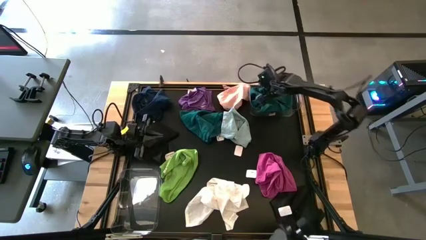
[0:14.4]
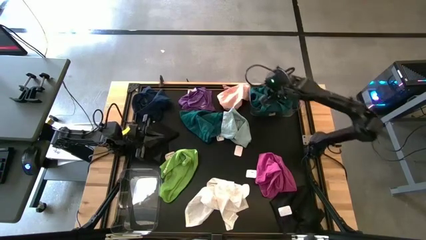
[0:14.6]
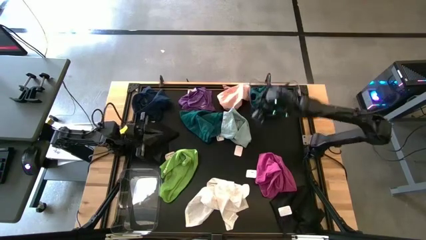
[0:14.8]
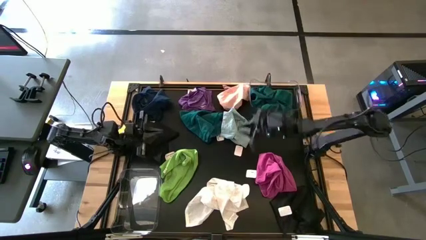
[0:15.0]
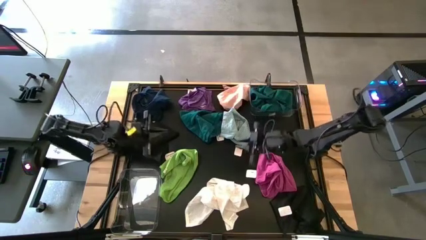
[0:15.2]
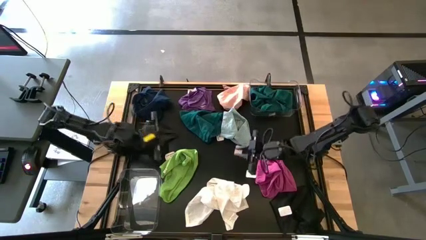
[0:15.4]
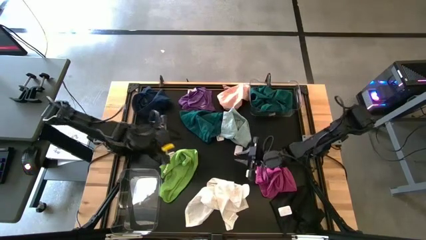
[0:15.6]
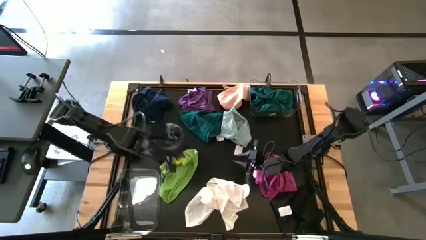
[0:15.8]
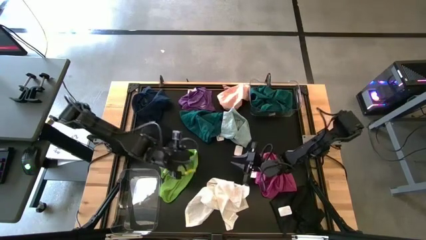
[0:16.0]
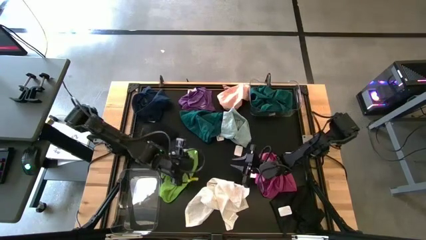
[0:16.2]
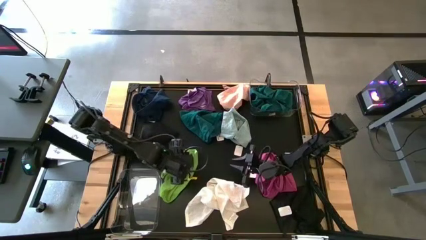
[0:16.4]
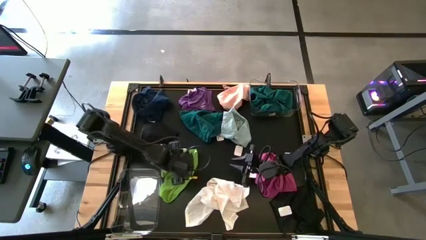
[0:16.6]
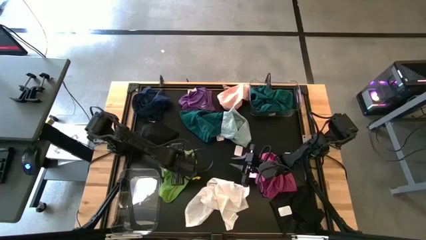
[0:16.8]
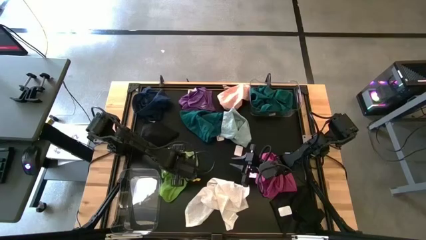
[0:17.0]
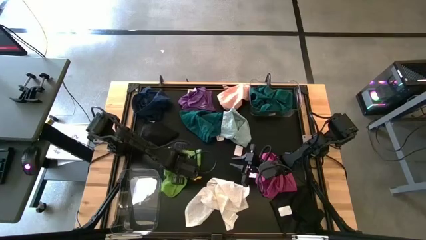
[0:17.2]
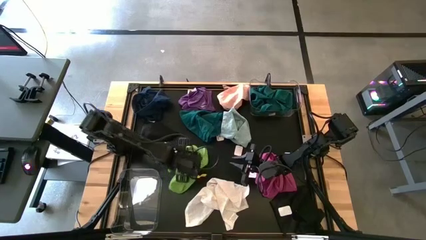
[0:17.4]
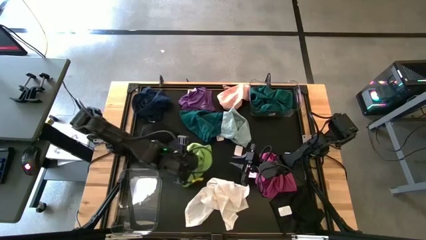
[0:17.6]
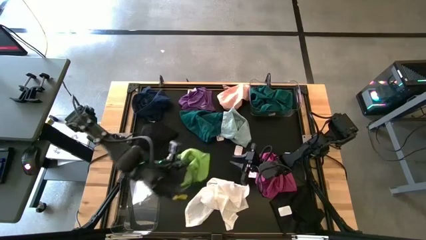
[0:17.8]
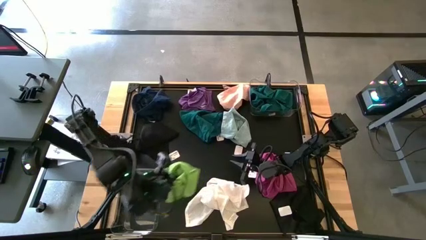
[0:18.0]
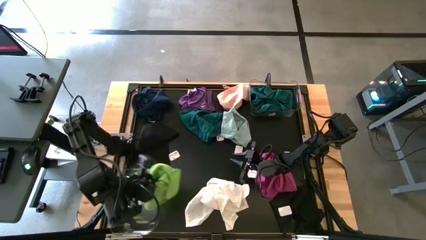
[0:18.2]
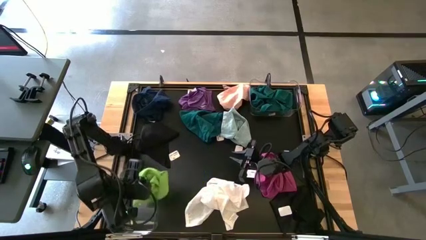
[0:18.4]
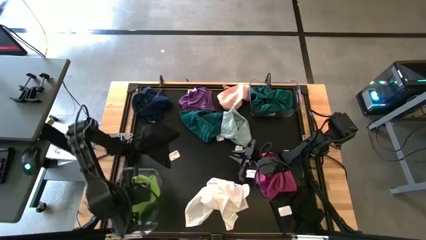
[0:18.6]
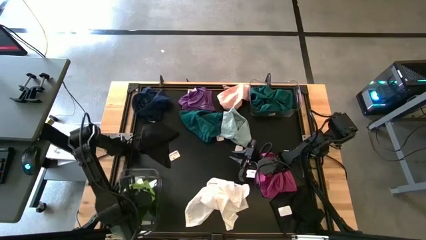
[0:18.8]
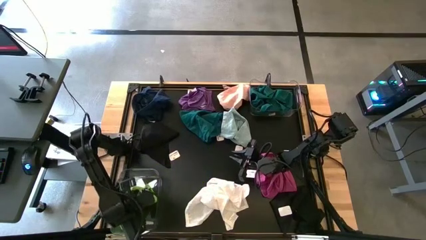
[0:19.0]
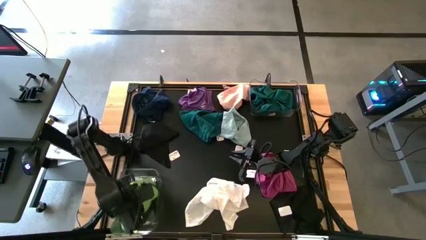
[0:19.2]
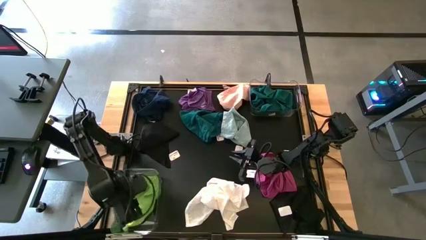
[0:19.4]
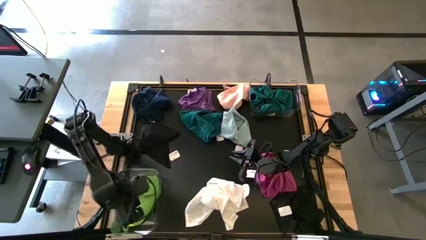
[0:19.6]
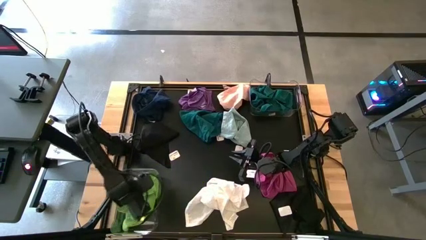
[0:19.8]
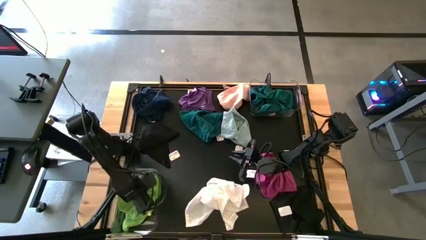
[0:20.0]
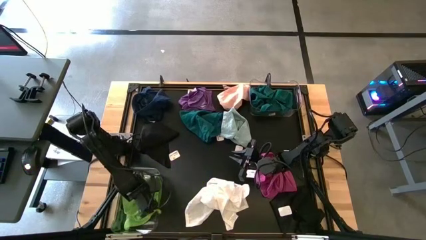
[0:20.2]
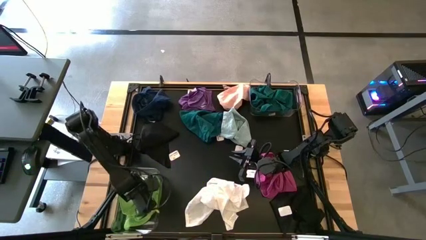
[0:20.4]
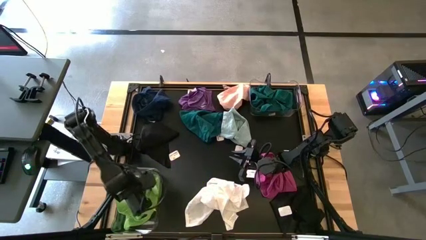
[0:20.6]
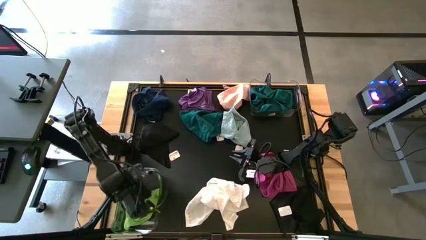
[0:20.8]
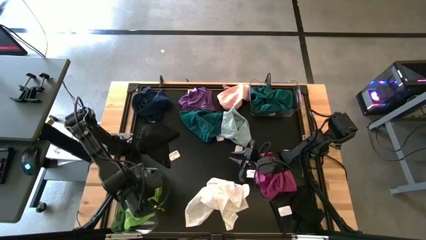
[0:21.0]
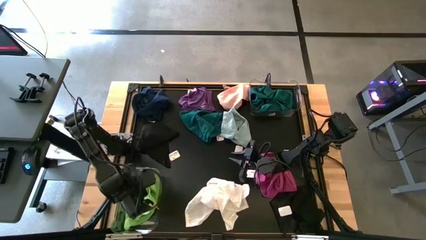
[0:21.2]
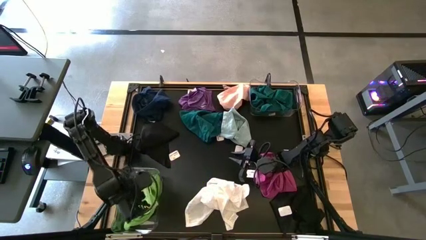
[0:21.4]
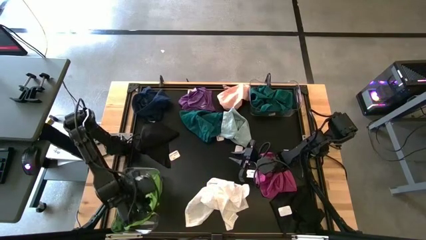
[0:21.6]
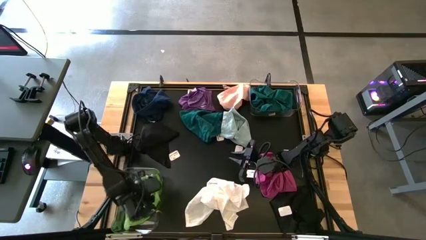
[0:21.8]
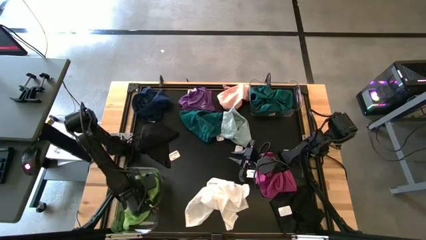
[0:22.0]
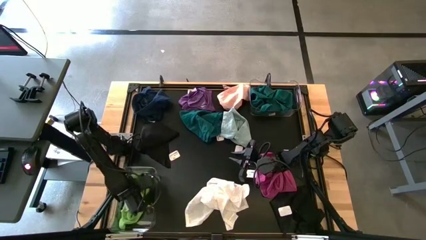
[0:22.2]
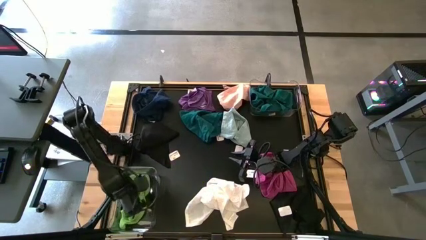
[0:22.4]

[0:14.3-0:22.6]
Task: Sort towels by color in basket
Put the light green towel into the bottom transparent bin

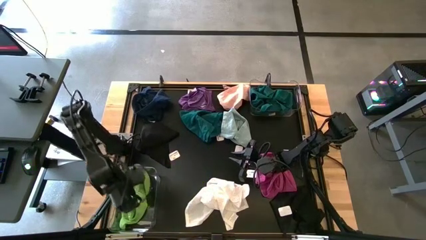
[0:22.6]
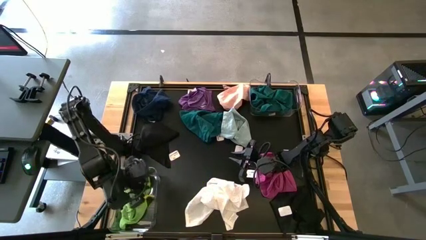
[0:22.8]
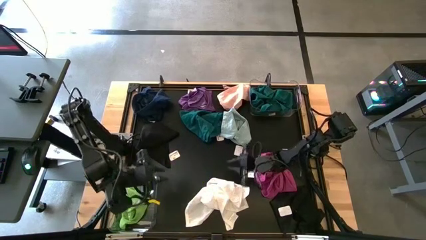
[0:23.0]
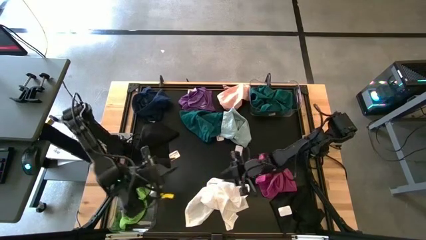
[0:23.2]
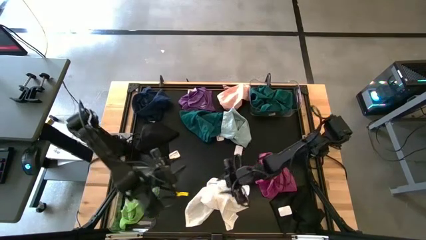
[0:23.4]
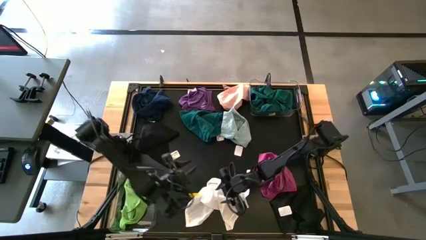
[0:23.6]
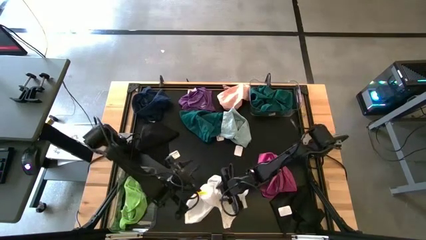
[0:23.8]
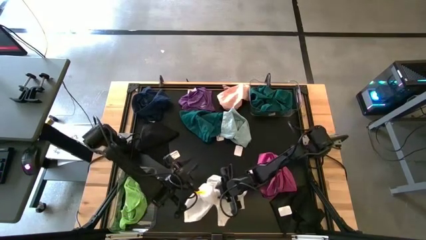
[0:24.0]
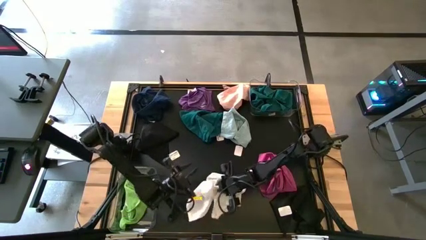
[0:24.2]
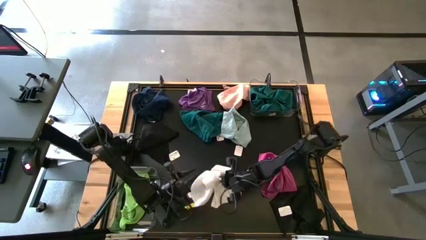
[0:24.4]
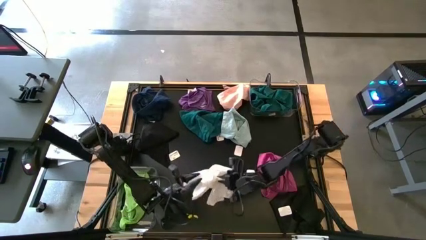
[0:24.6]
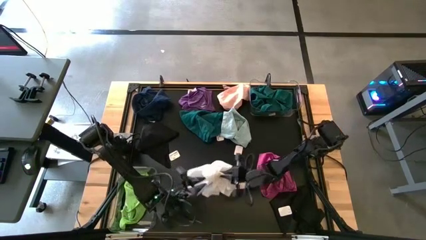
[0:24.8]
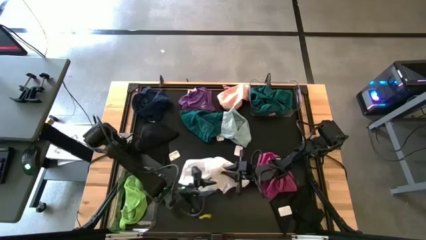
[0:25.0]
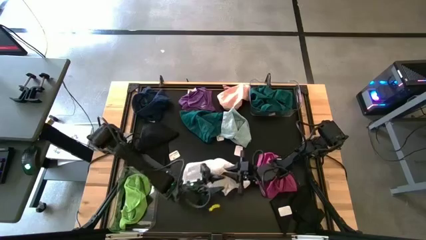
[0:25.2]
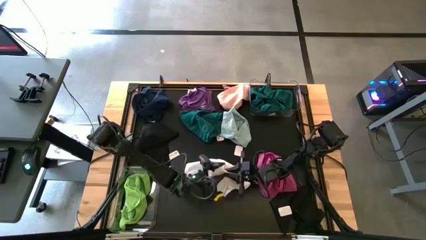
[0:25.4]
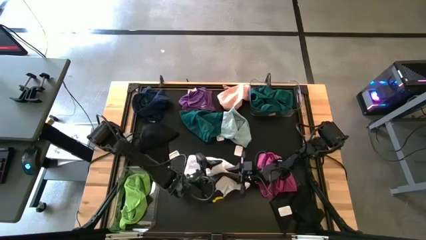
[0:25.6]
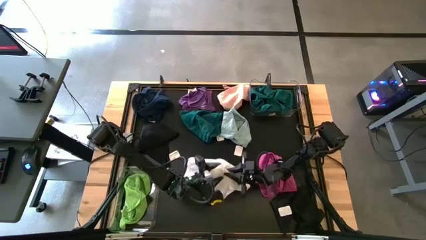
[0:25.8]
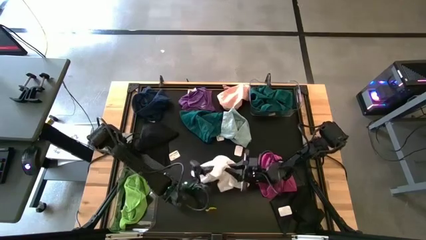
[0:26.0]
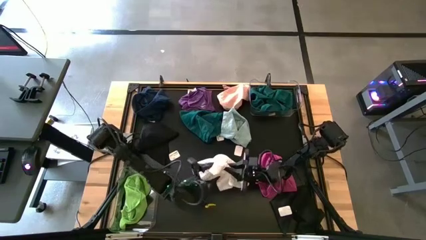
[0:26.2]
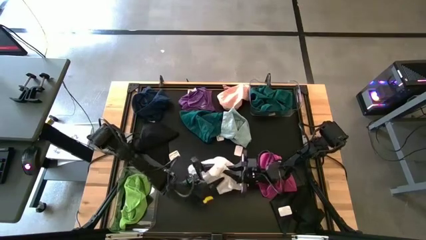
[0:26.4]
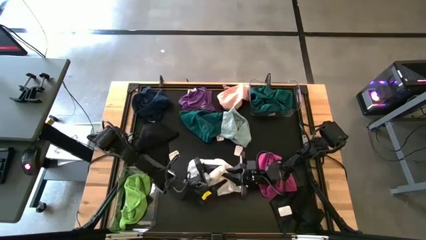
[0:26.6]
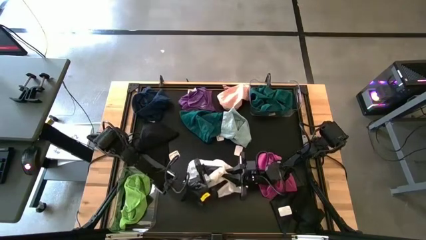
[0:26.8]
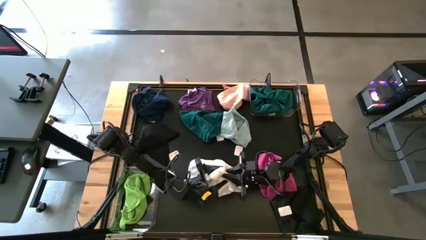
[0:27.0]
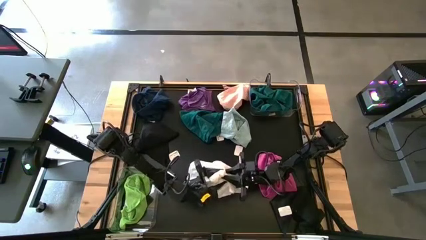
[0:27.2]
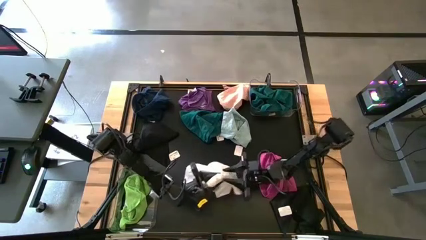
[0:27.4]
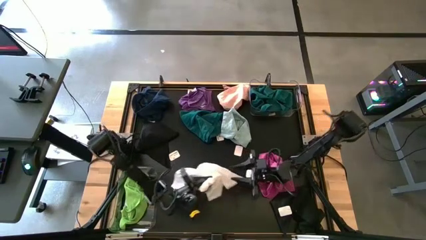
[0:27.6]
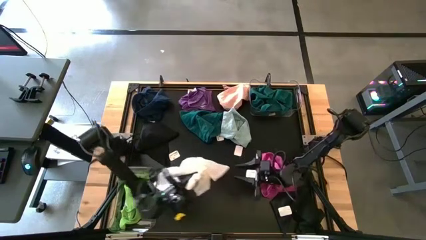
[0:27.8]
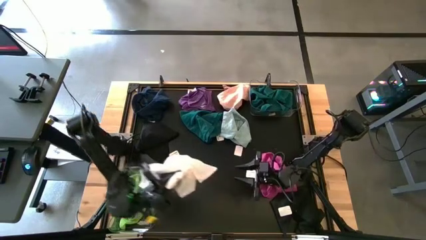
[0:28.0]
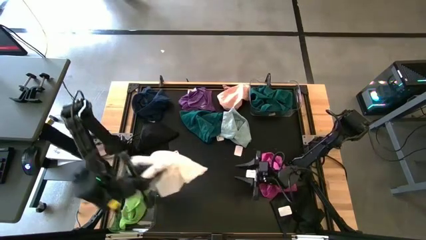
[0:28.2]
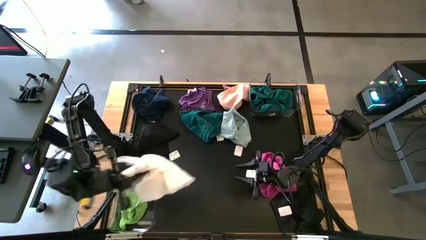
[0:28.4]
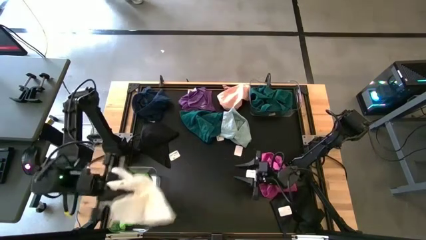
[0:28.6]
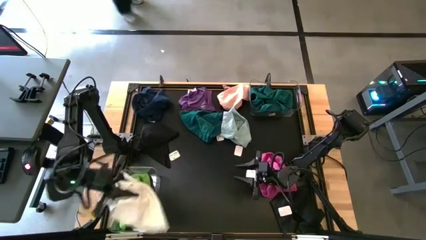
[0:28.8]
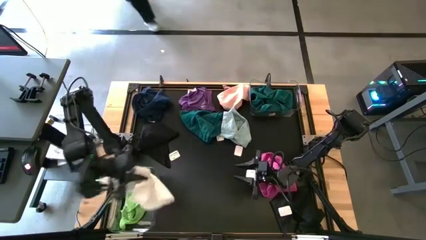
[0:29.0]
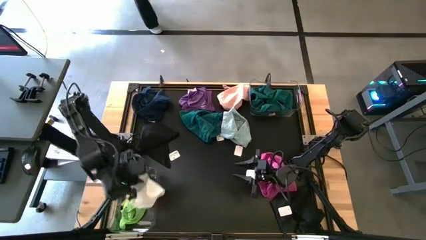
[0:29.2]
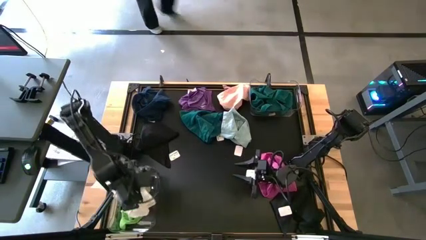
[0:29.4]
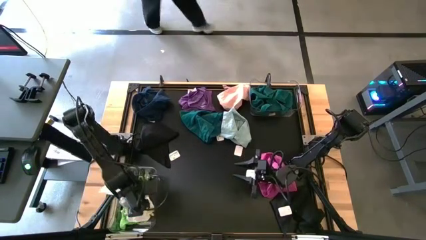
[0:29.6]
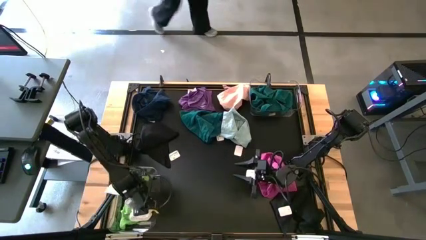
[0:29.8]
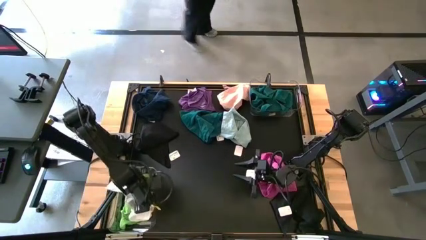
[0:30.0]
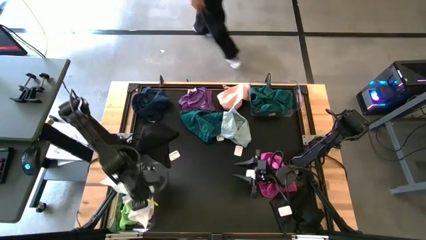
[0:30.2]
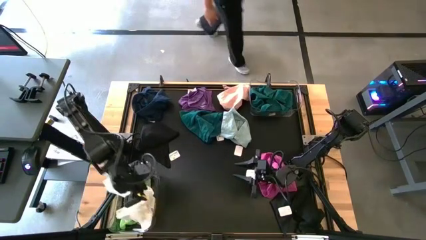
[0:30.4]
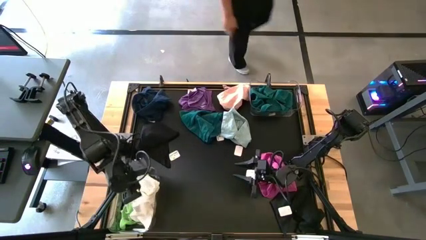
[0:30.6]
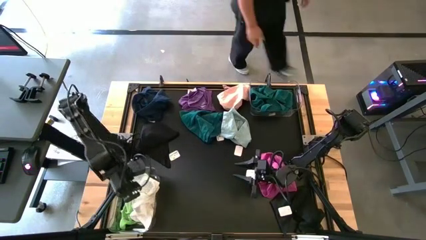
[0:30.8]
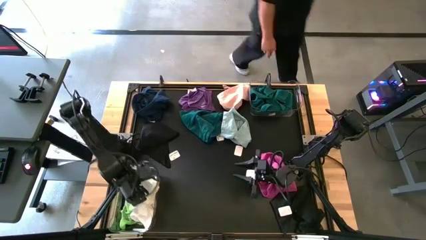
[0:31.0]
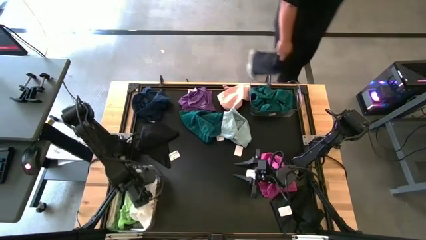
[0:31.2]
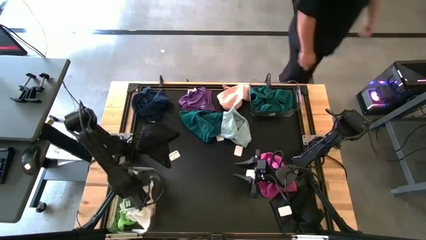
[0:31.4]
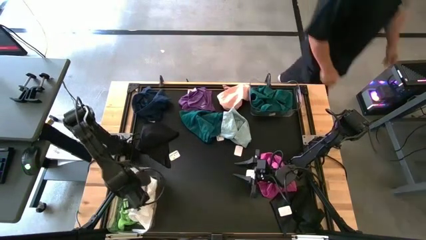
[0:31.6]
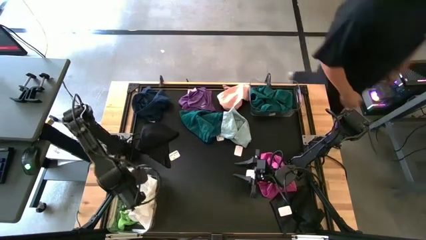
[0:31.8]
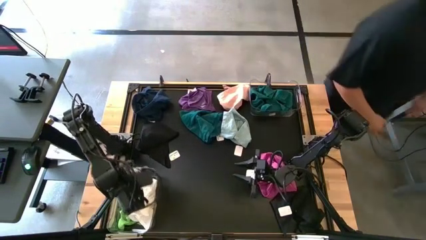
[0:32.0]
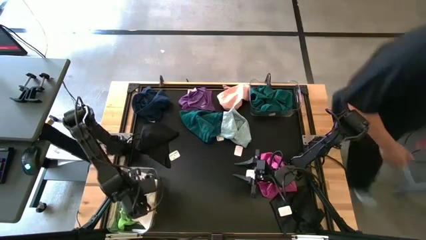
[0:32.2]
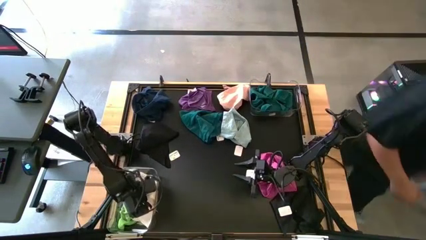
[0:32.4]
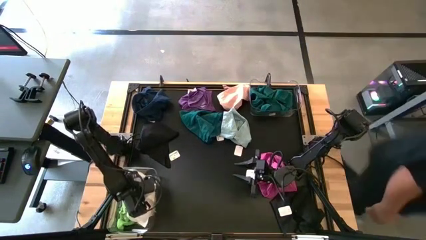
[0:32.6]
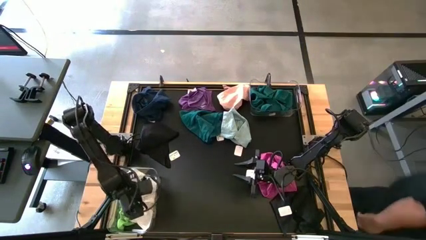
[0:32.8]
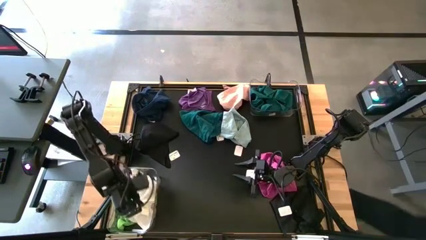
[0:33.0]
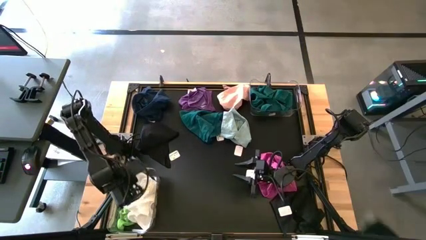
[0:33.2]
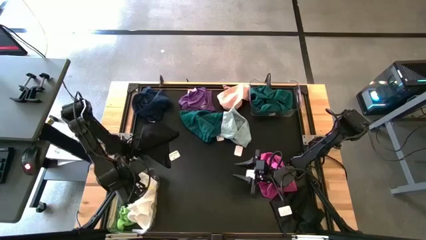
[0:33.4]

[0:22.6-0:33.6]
Put the white towel into the bottom transparent bin
